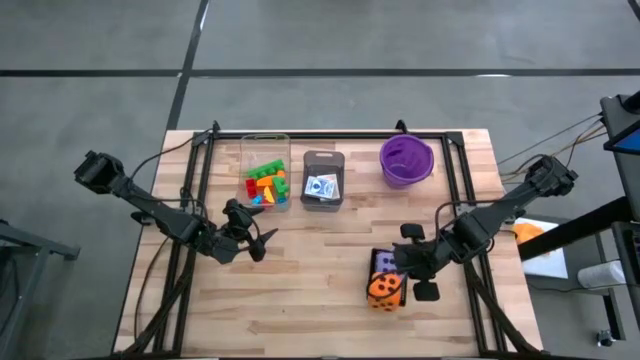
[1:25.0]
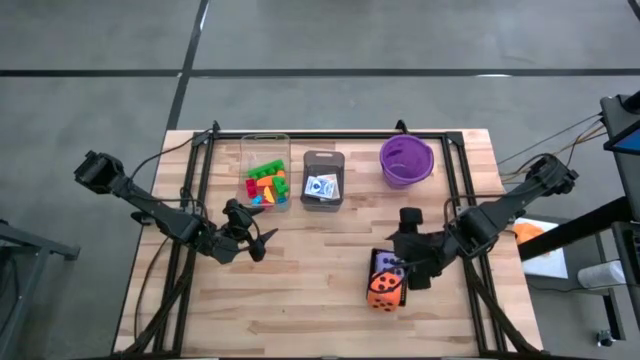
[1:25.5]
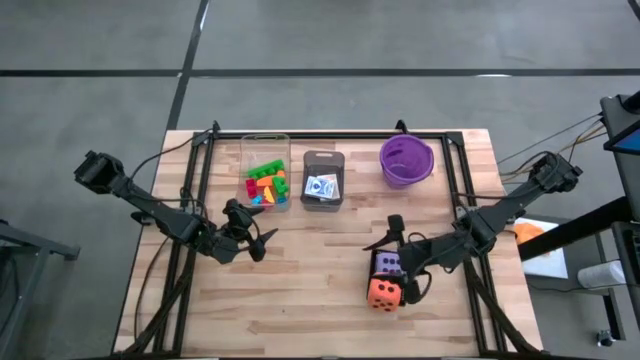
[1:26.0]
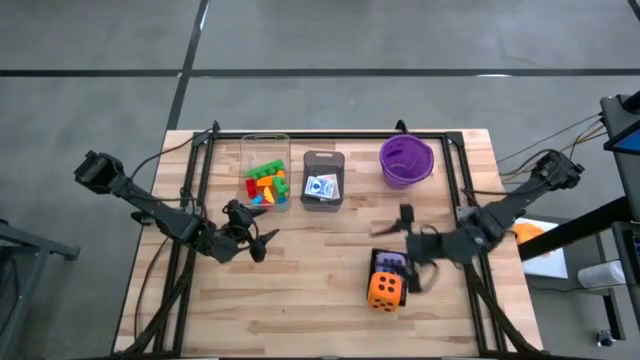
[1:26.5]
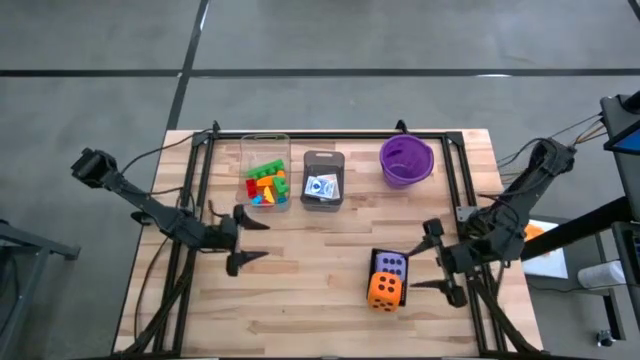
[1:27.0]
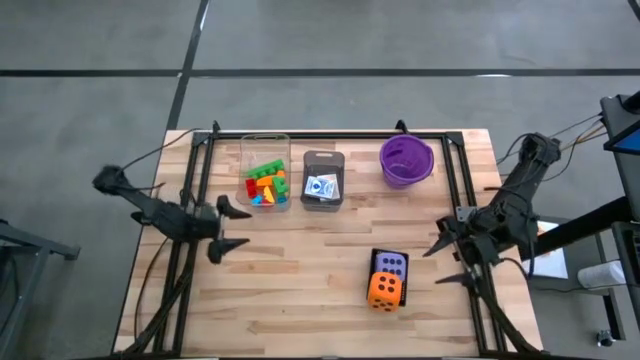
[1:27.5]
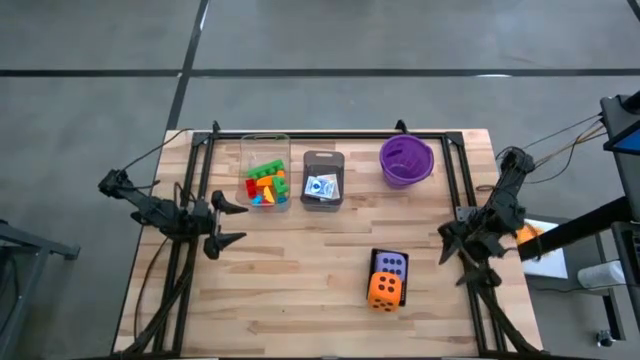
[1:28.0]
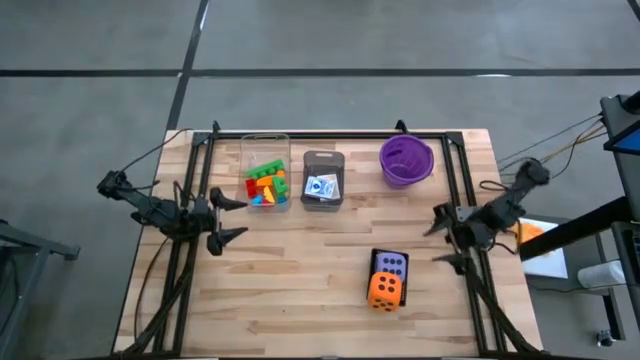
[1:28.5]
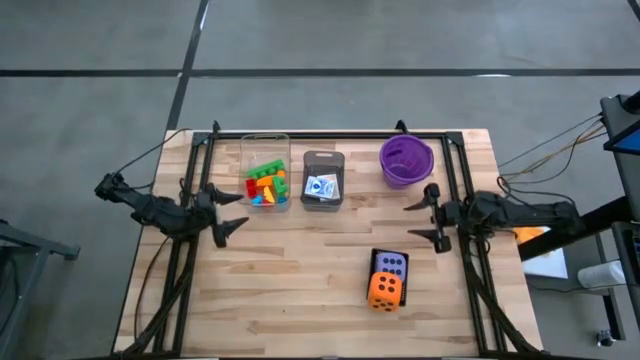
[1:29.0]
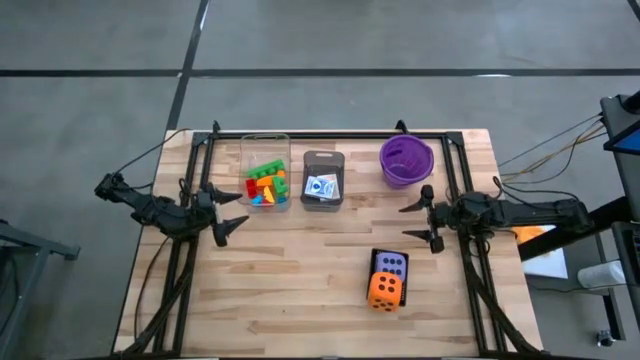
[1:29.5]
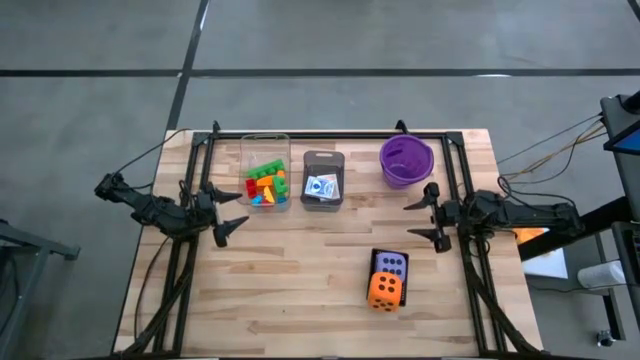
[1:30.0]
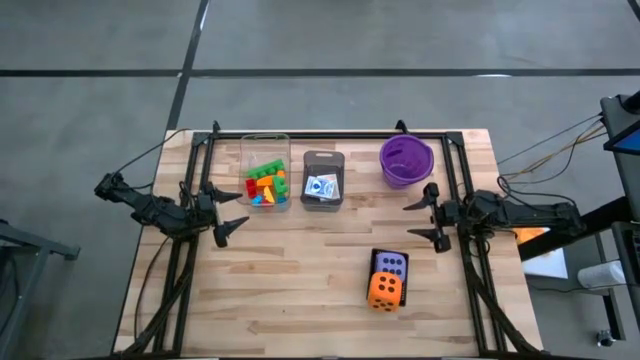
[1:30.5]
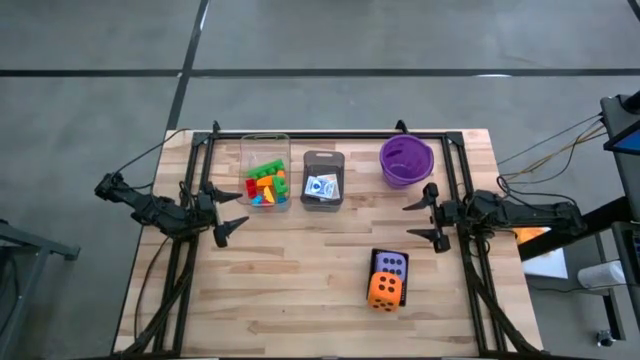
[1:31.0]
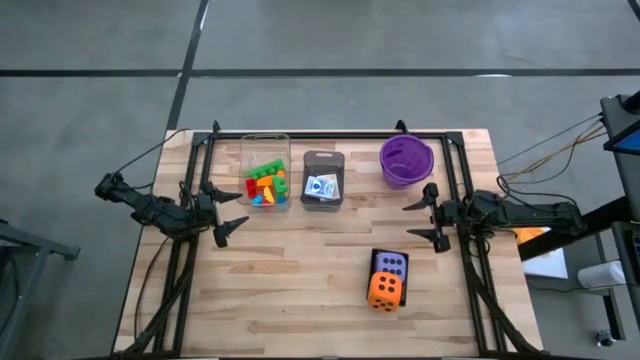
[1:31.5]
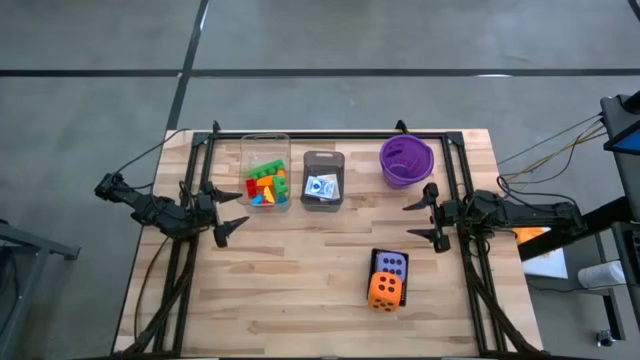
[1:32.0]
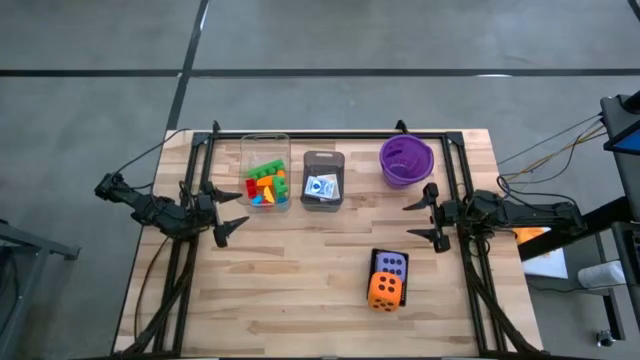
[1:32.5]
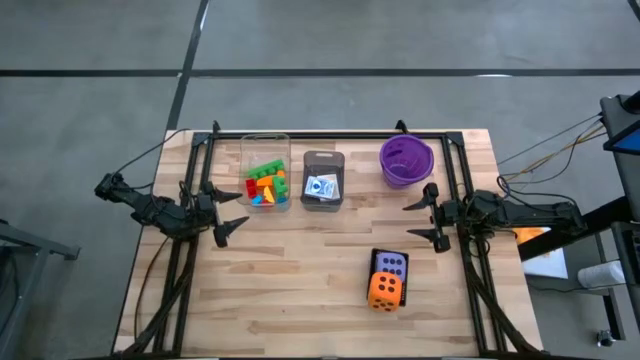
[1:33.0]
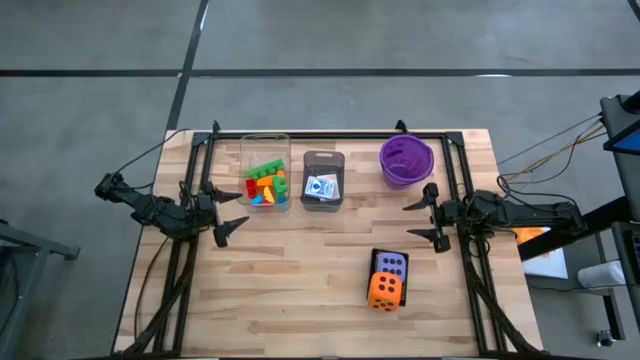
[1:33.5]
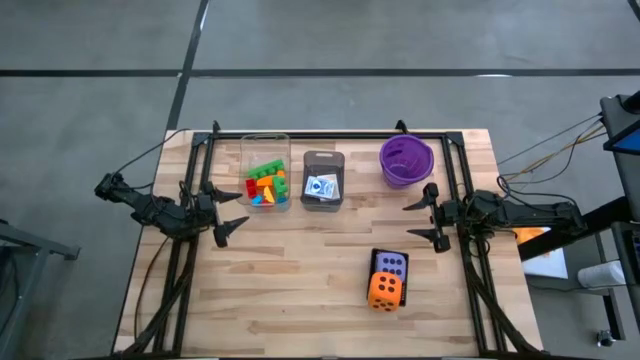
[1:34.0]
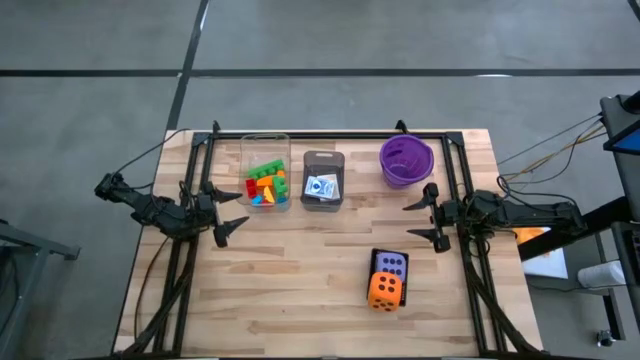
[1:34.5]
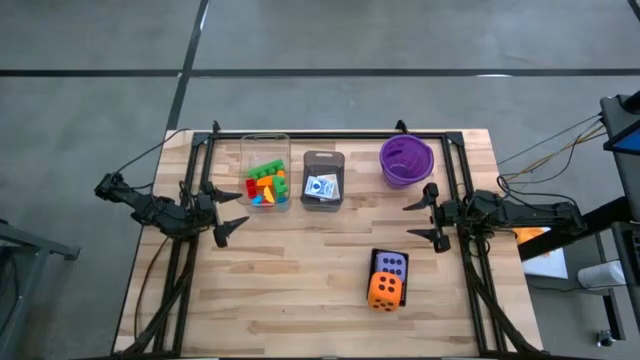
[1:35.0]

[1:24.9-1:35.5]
Task: Pick & Place Toys
Return to Home Position

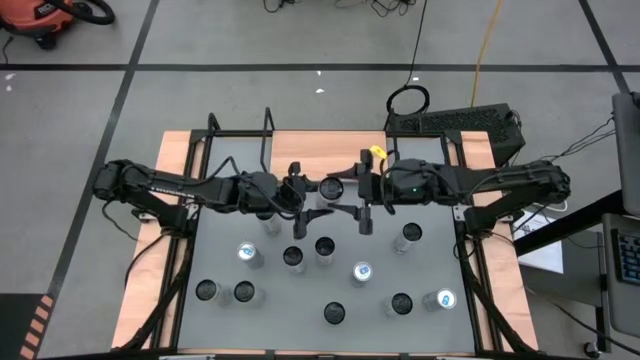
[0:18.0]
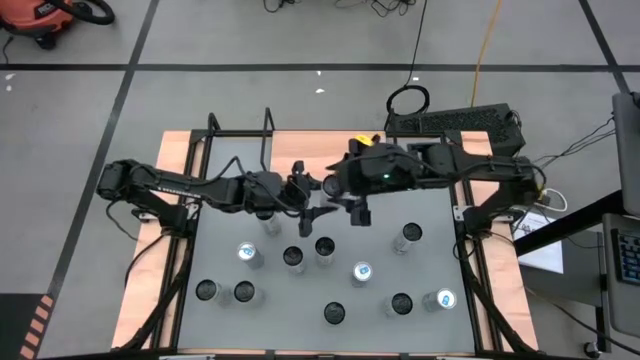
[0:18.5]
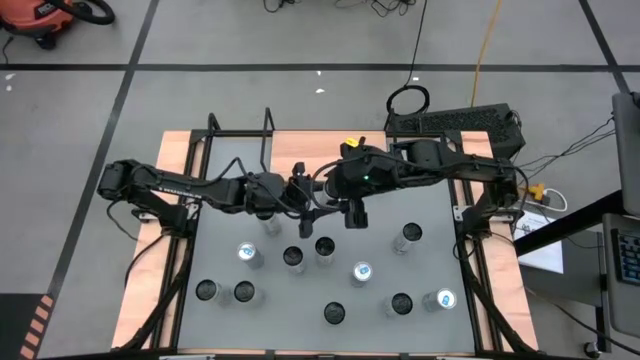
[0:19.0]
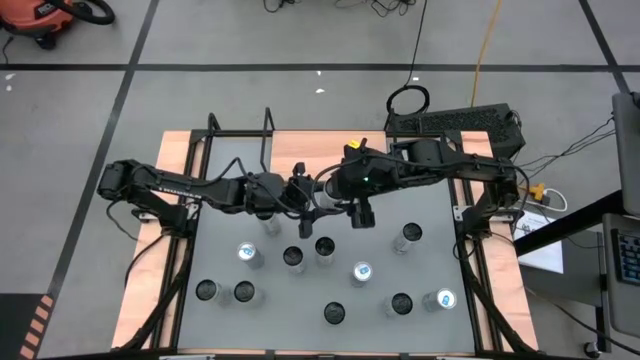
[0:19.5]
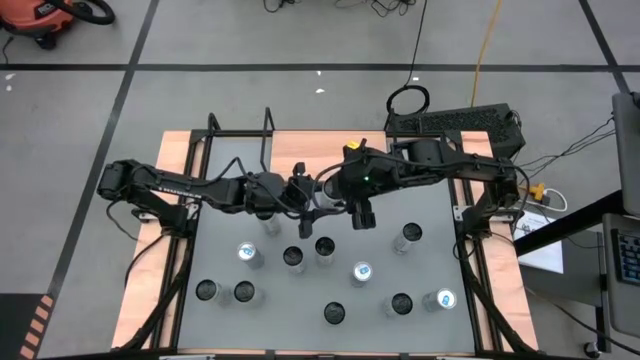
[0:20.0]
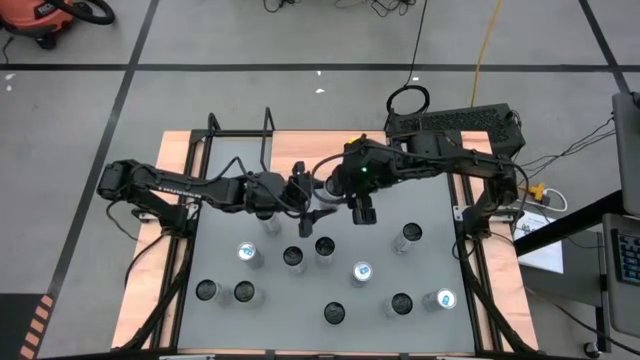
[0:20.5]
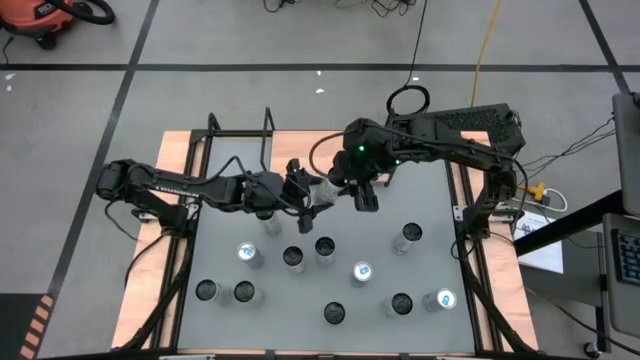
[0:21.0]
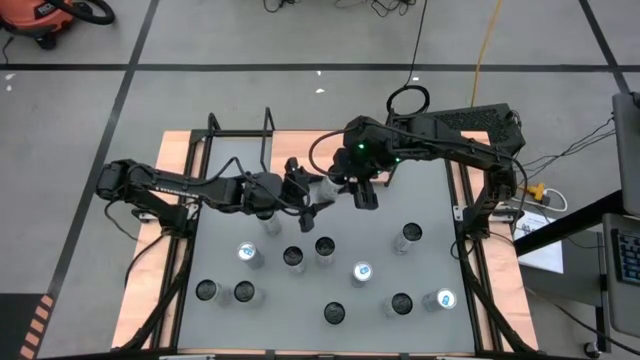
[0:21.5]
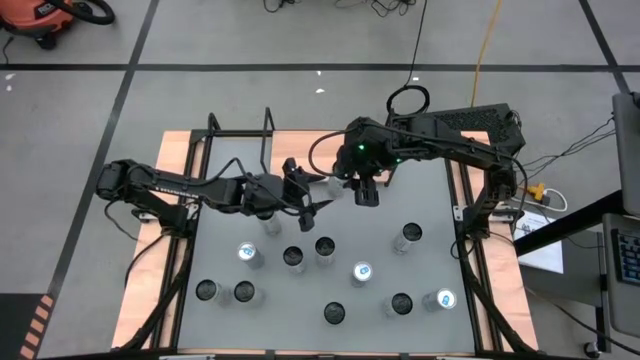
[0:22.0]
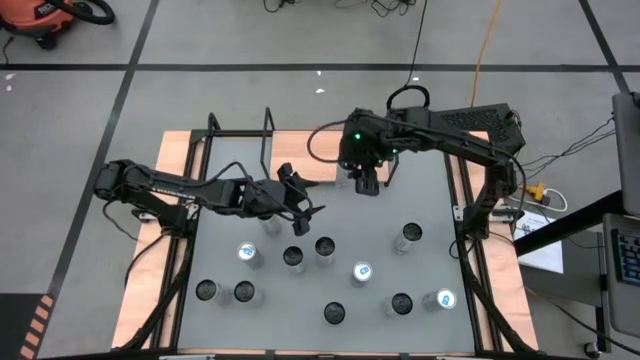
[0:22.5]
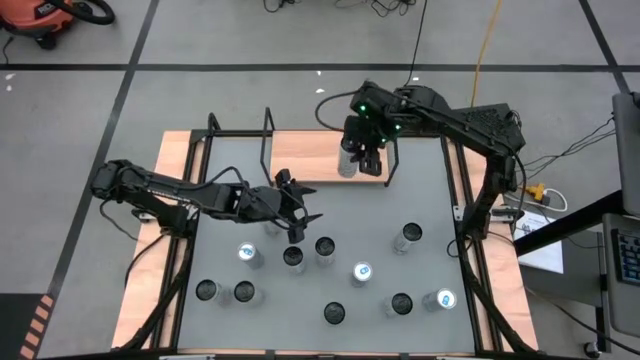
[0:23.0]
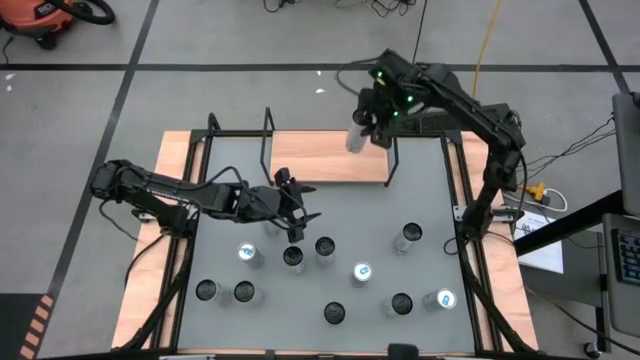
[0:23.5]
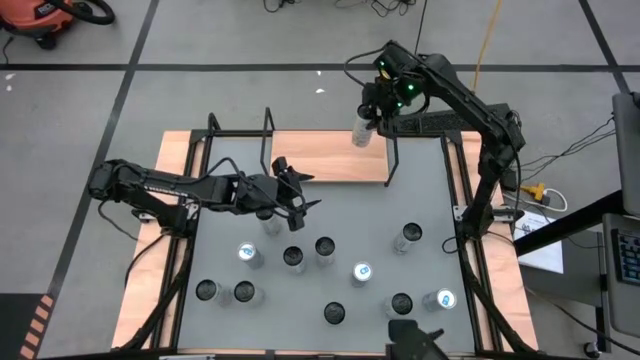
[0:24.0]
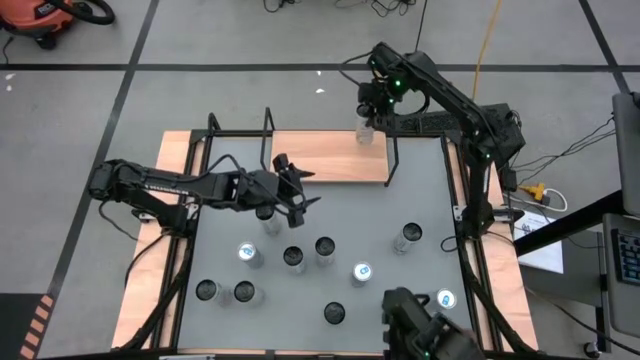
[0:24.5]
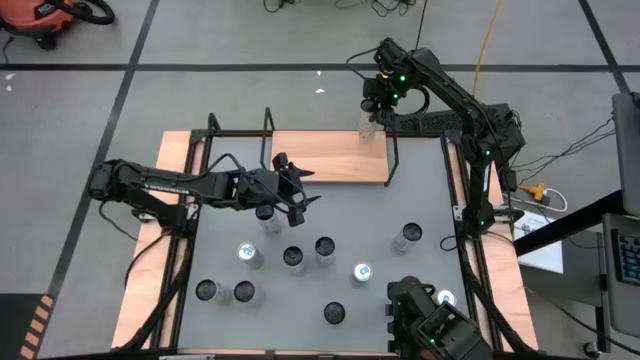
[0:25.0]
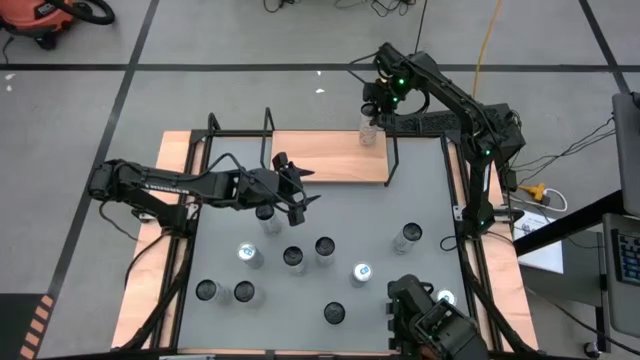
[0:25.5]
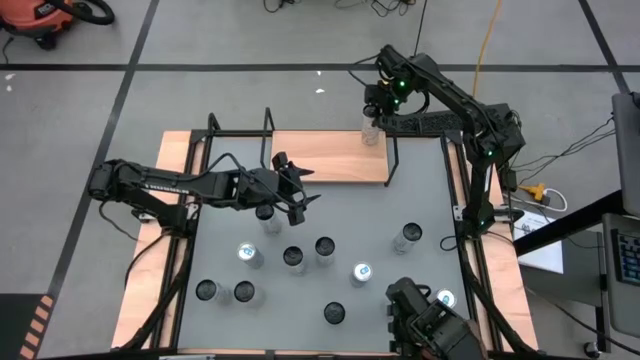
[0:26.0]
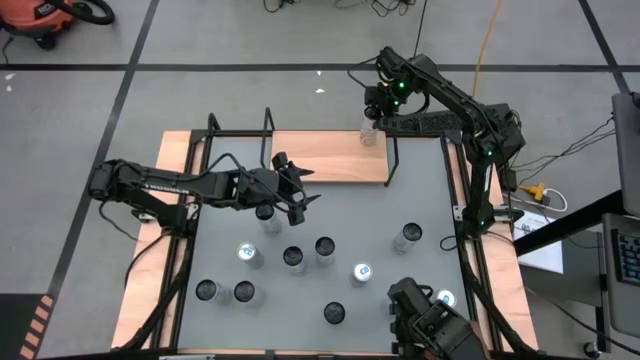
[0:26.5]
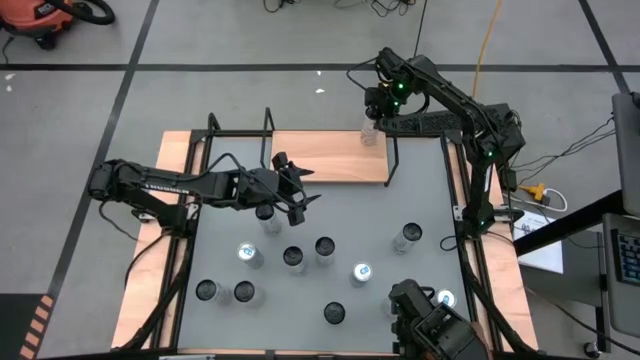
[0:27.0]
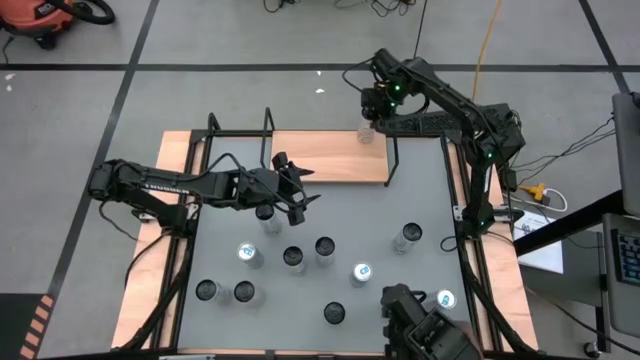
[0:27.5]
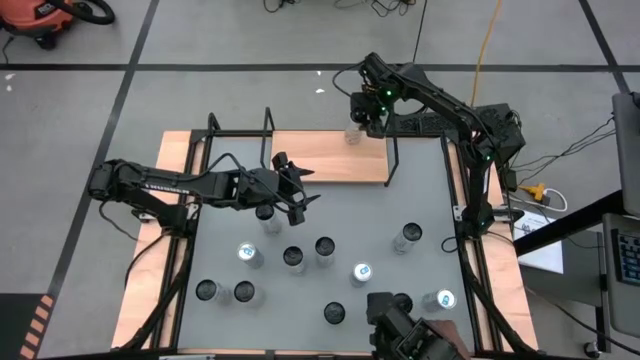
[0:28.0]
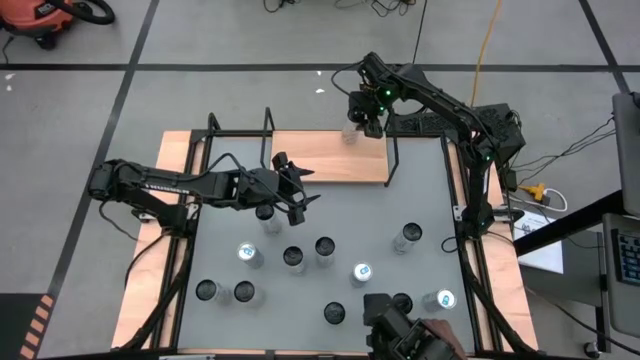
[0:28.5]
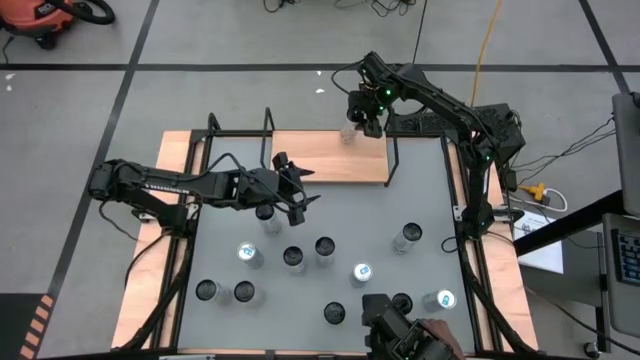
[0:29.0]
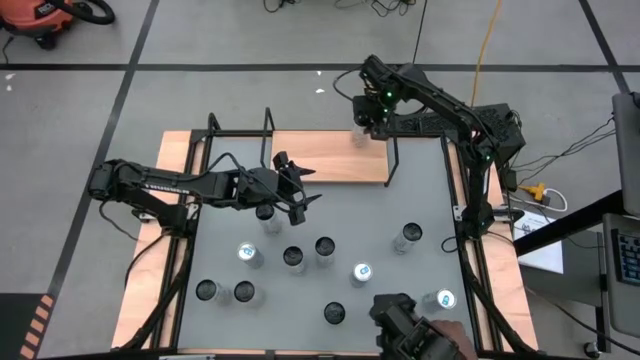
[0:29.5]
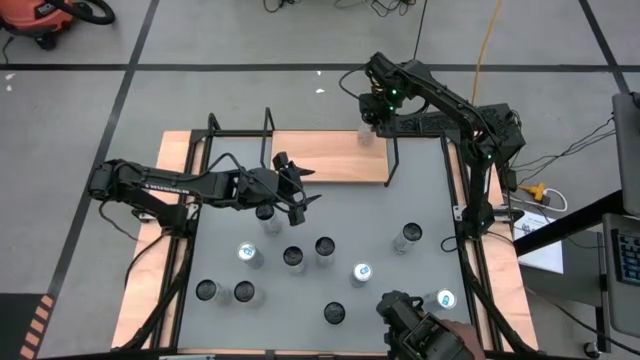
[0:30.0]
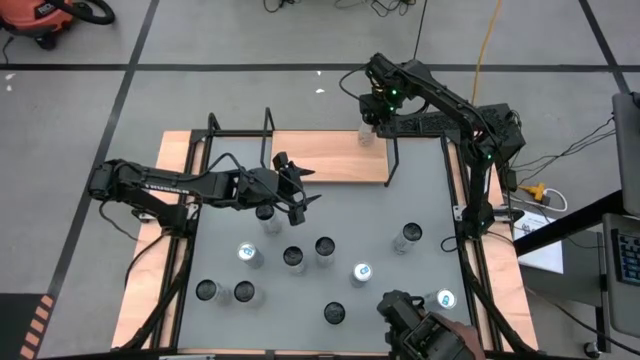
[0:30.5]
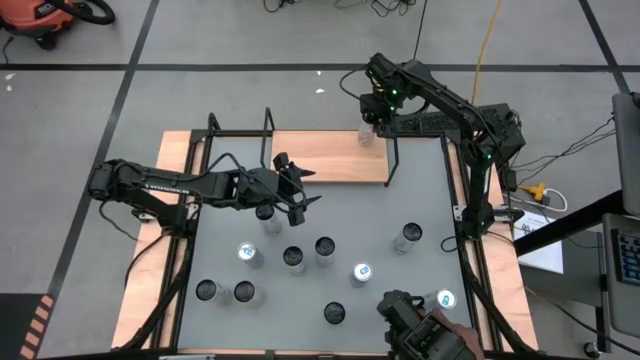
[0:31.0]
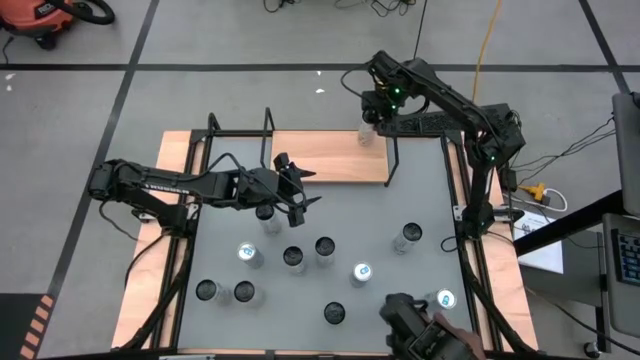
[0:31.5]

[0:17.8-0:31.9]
Task: Place canned beverage on shelf
Put the top right white yellow soda can on the shelf
